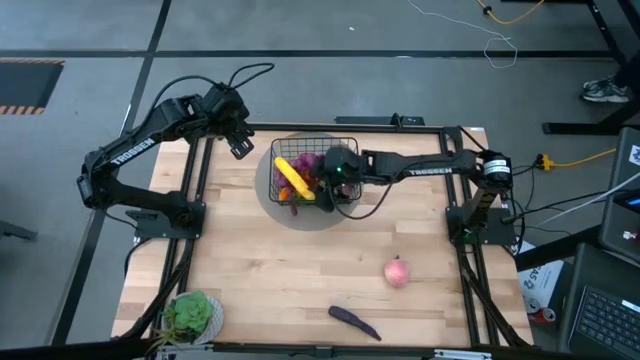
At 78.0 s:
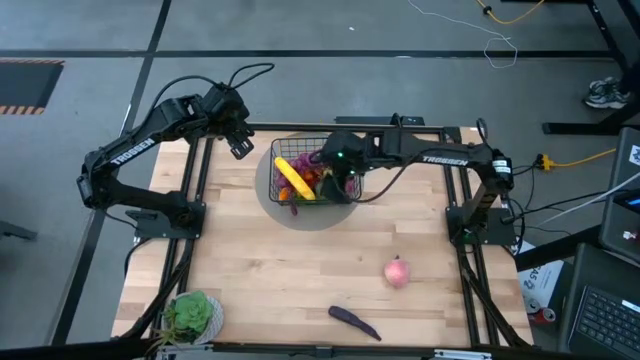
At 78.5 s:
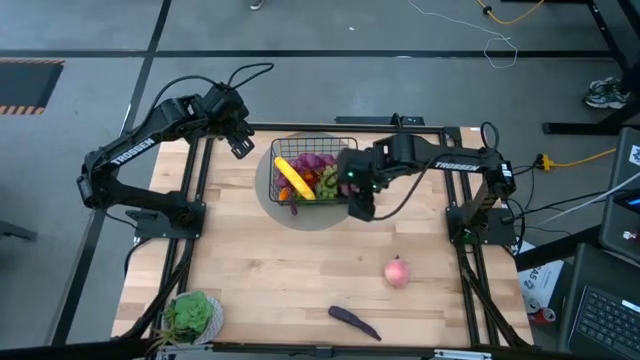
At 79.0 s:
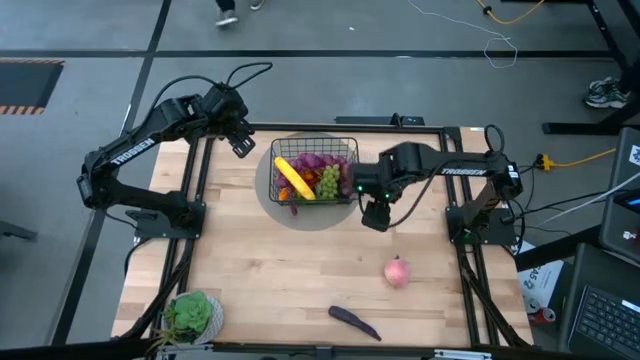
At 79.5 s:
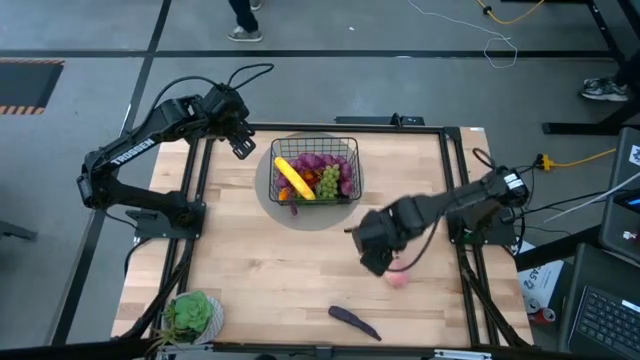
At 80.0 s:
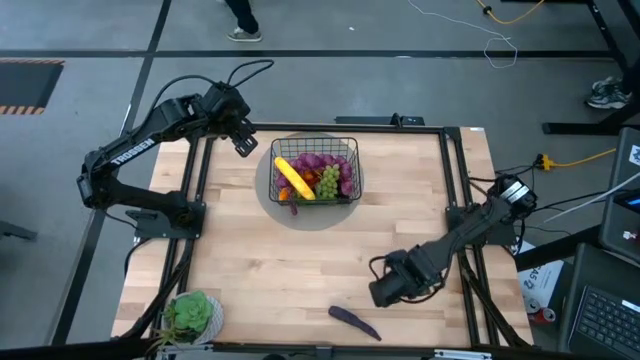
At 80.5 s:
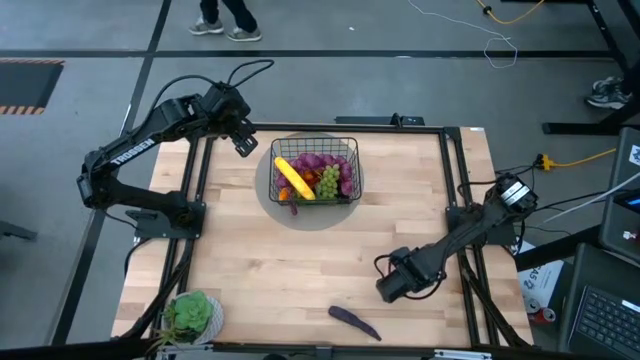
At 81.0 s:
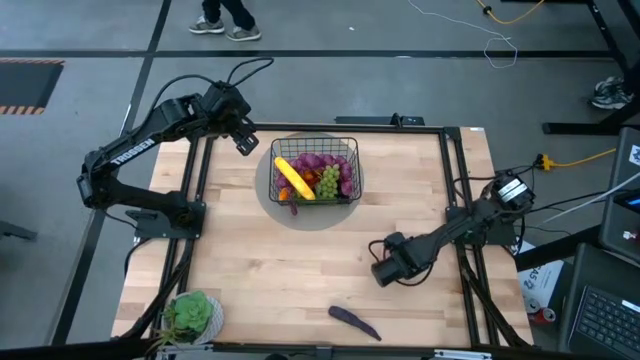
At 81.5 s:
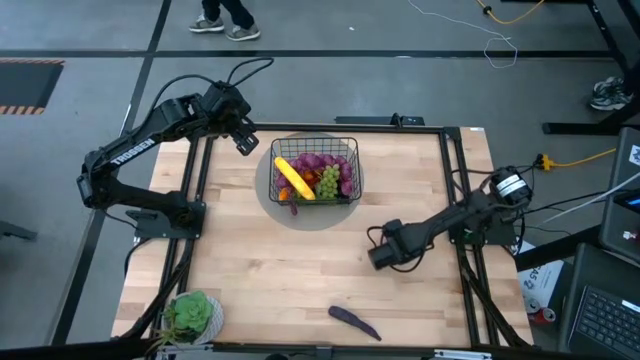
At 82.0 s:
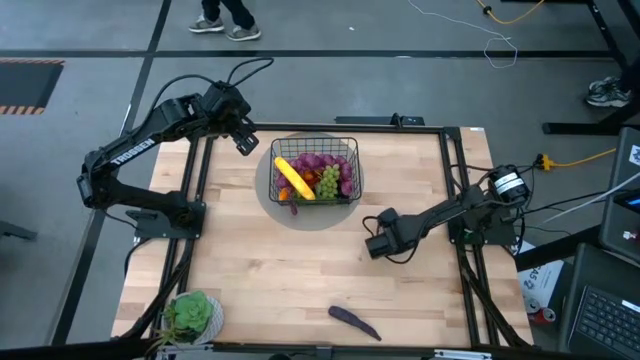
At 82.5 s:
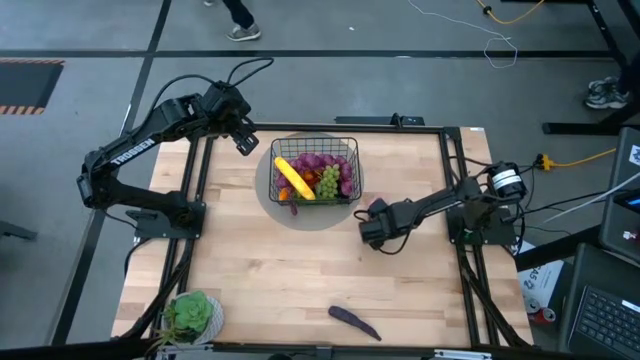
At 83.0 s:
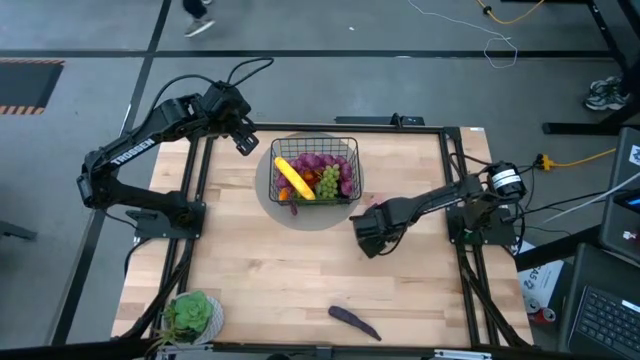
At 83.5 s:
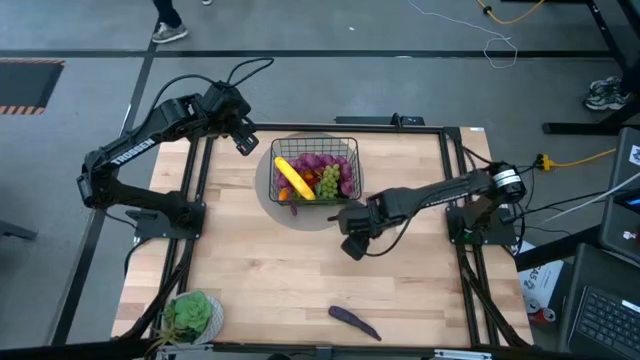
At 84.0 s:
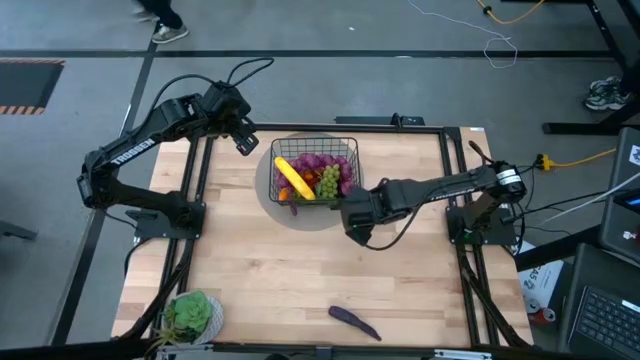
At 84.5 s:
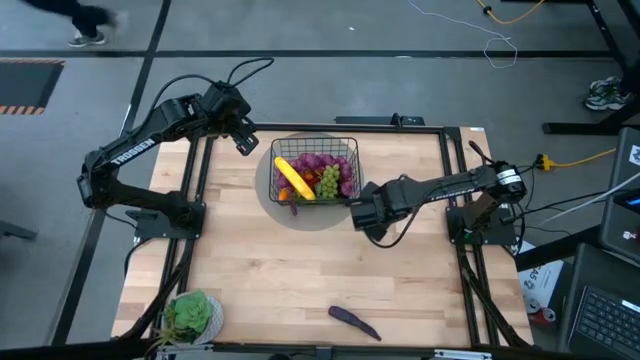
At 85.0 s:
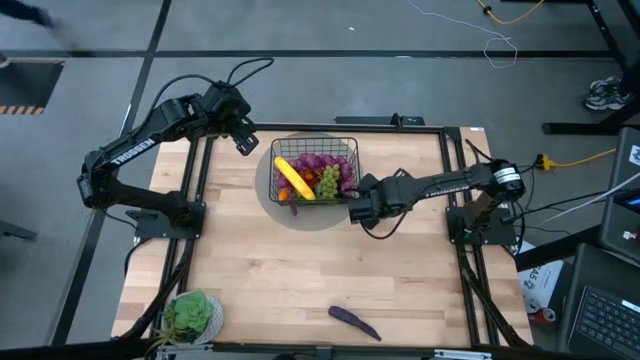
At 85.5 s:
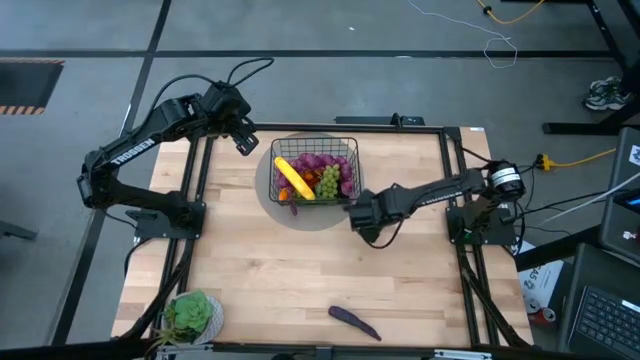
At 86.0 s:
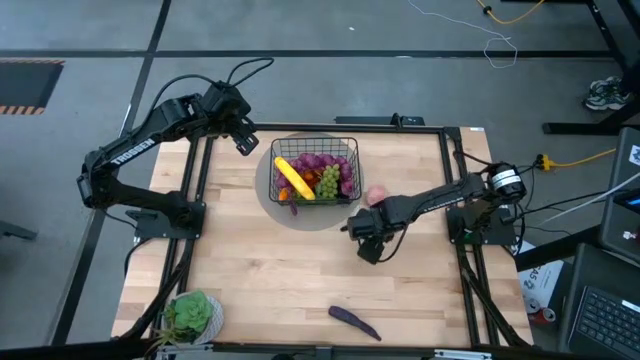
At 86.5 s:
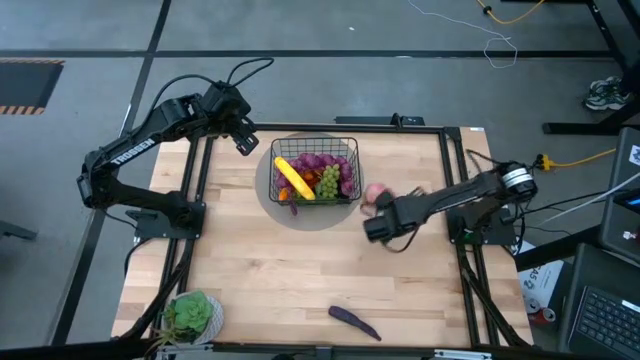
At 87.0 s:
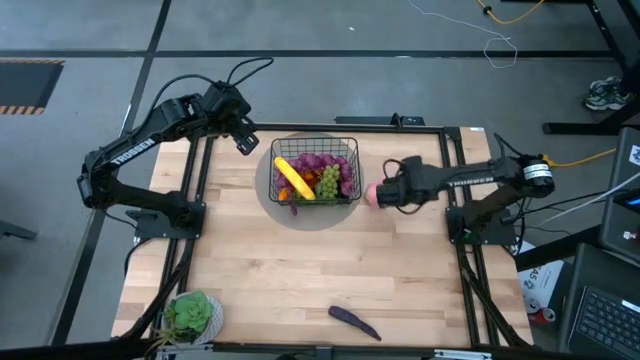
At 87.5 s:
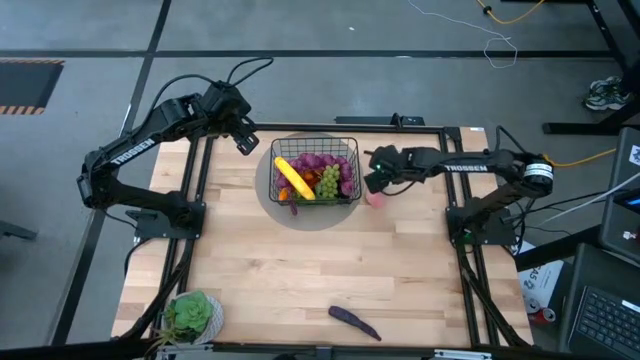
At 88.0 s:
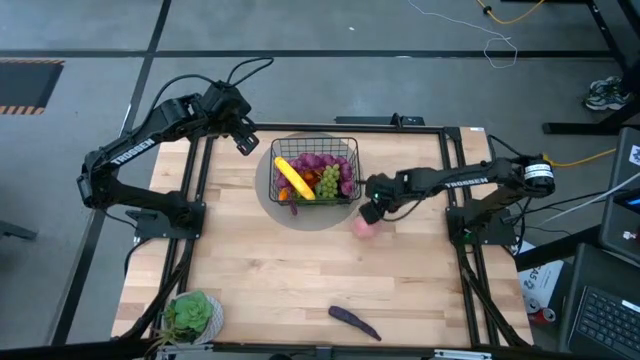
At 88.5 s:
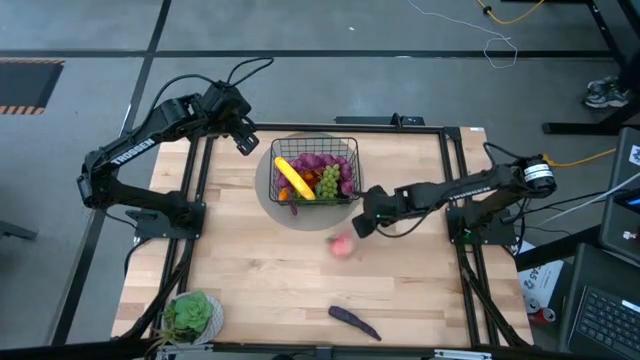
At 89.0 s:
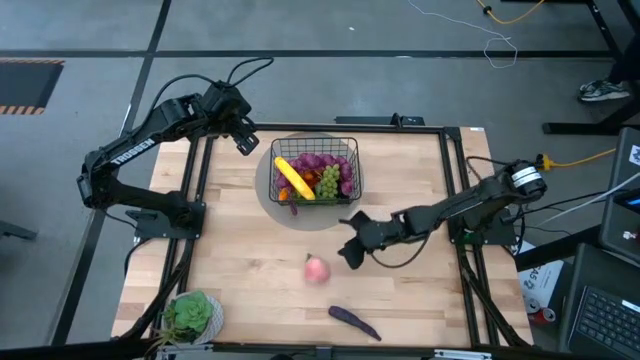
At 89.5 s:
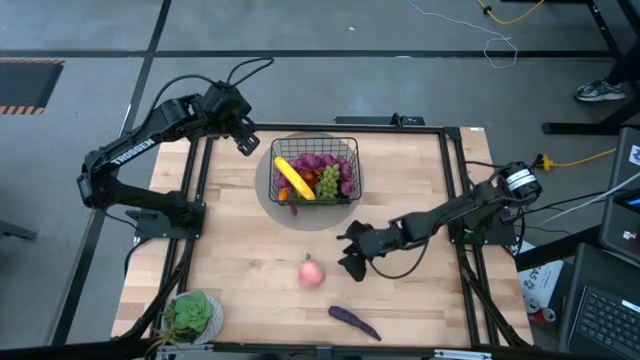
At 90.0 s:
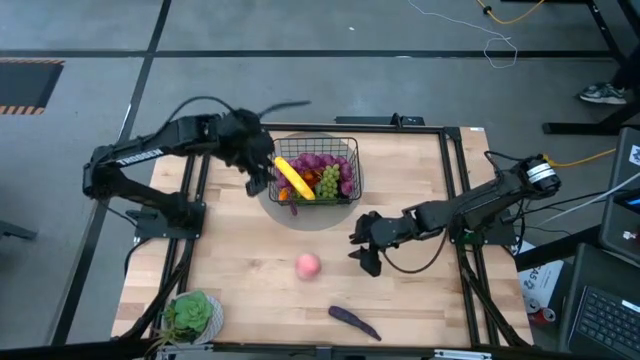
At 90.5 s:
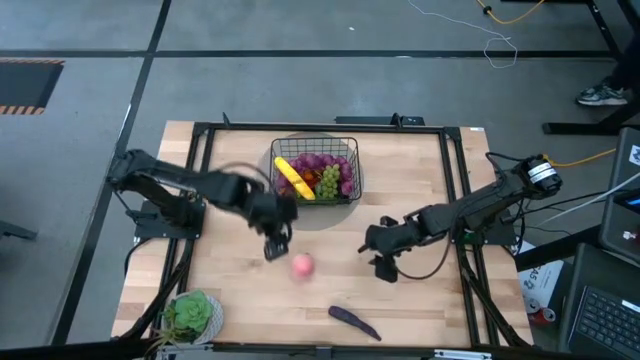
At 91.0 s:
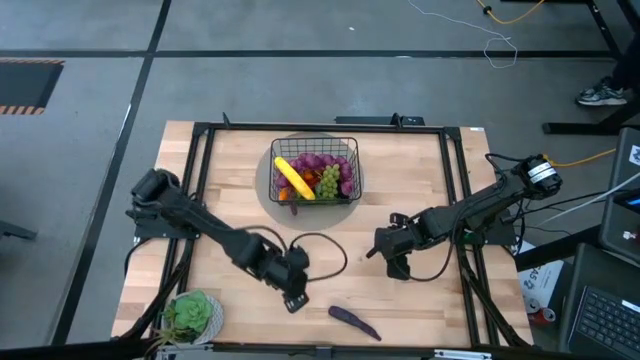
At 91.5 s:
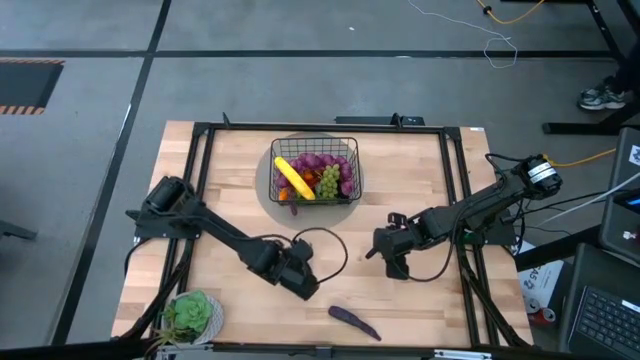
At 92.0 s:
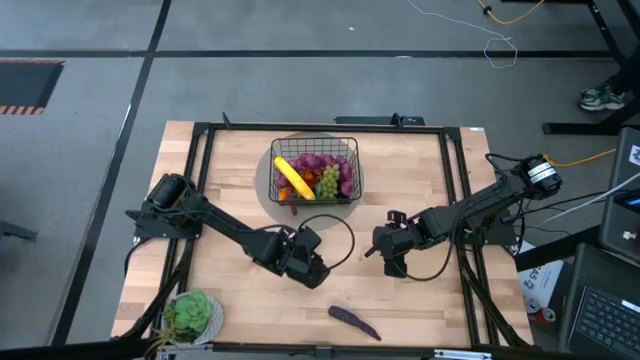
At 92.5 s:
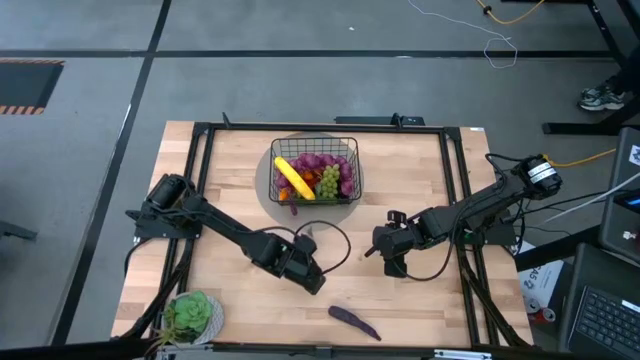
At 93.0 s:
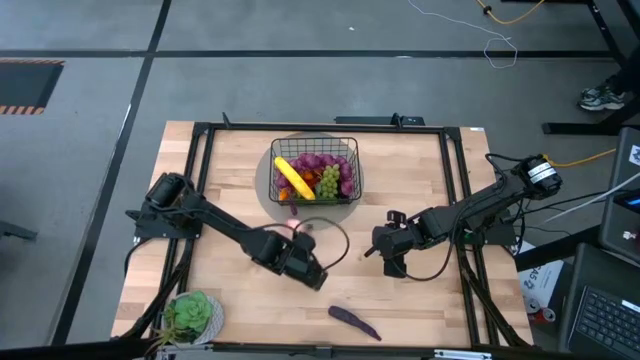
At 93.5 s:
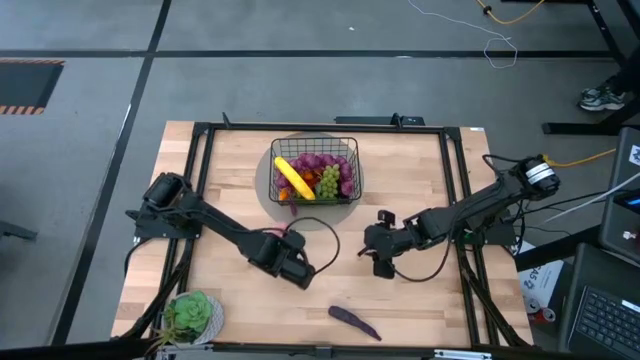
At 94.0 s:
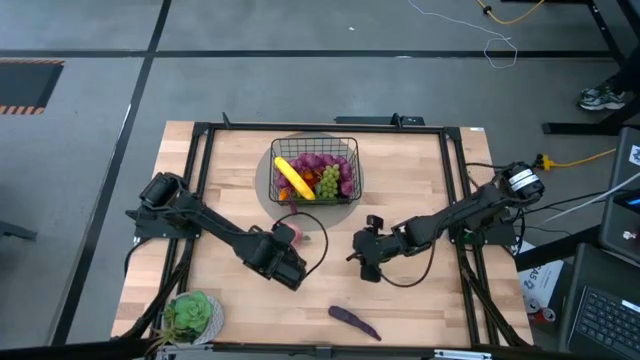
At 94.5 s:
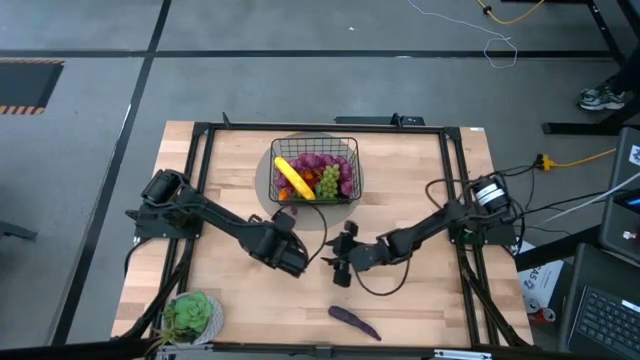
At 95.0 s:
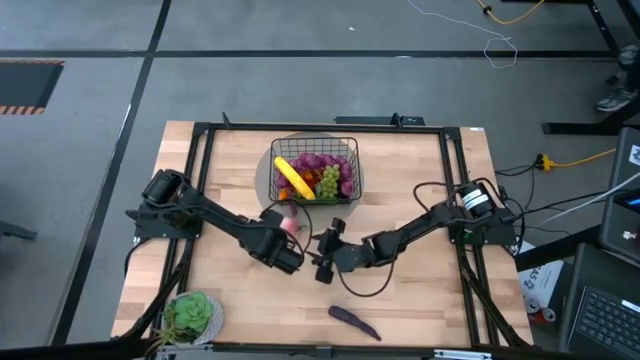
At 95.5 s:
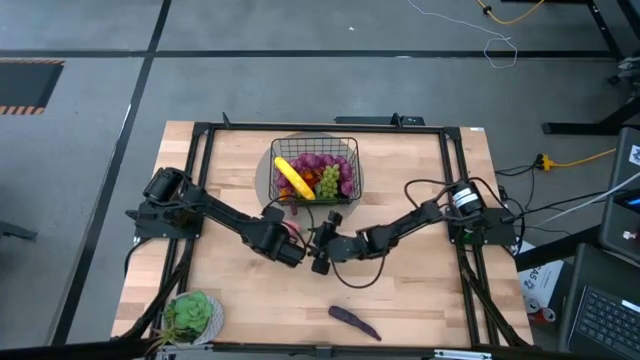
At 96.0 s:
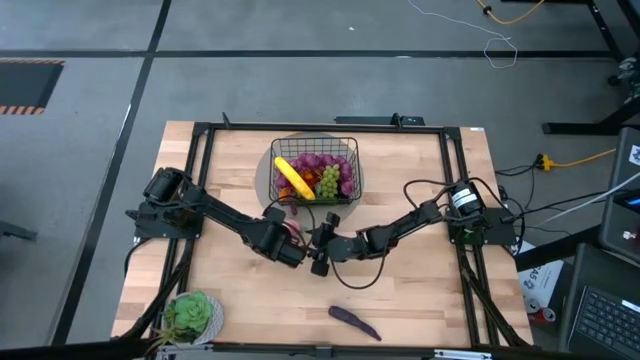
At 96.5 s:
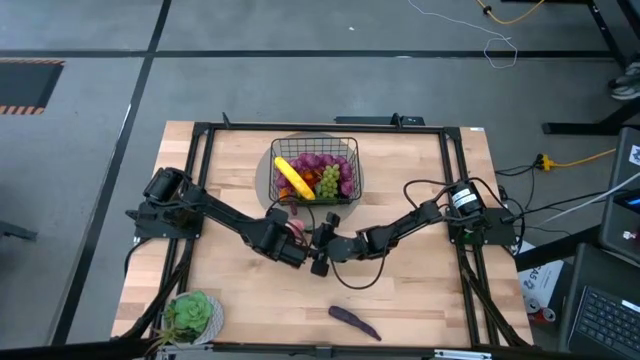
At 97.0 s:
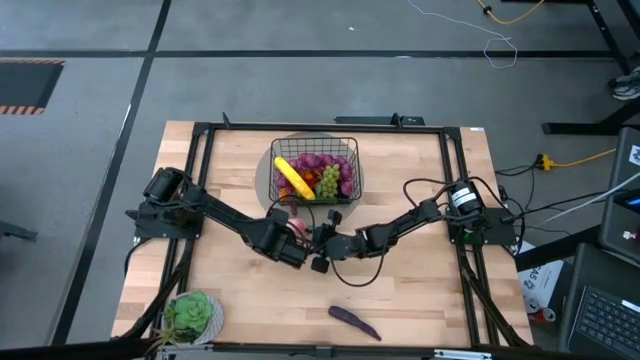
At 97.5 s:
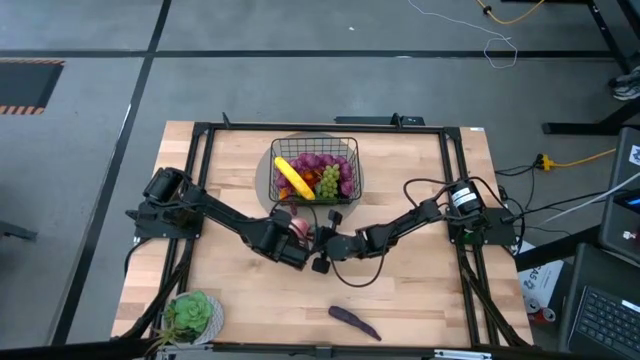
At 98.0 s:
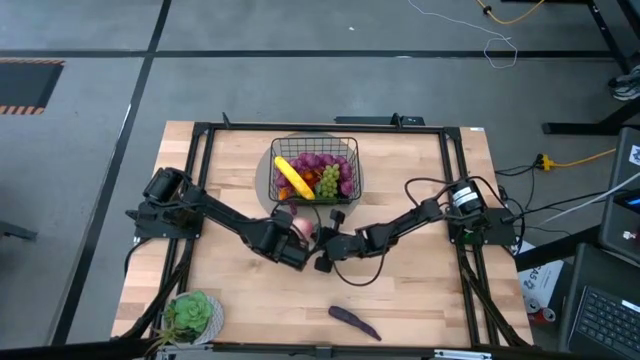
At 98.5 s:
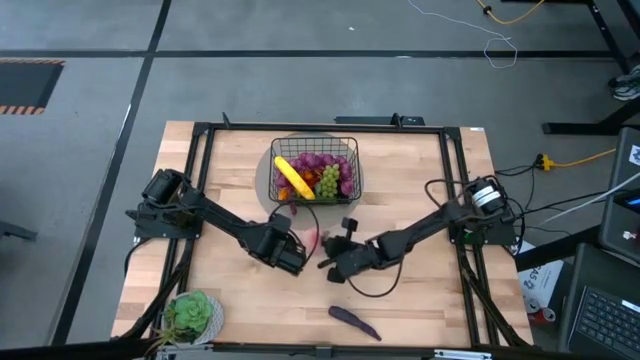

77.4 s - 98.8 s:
Task: Build produce basket
Put the pink peach into the wire basket
